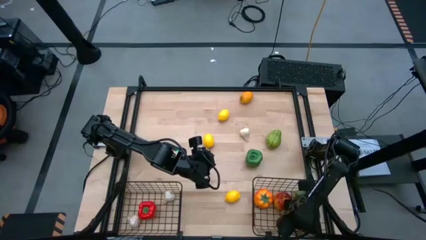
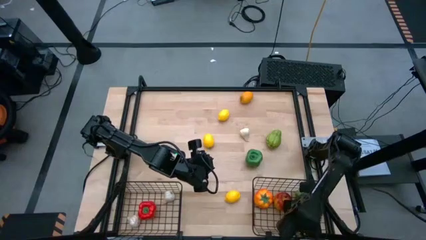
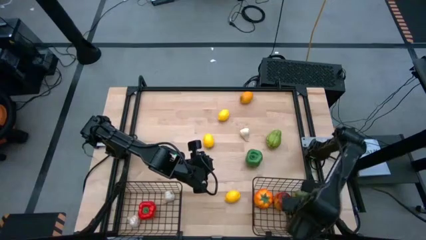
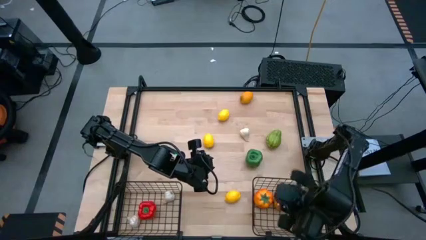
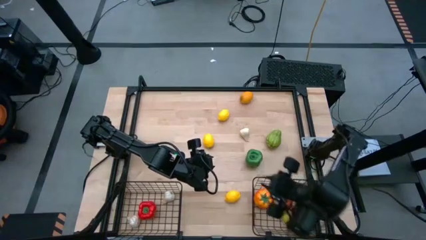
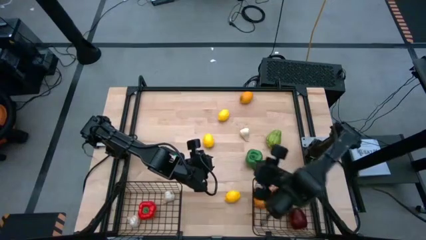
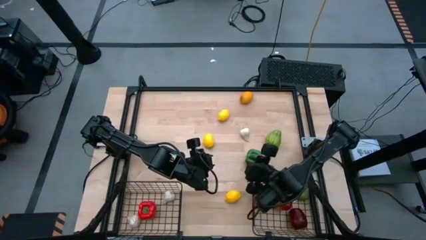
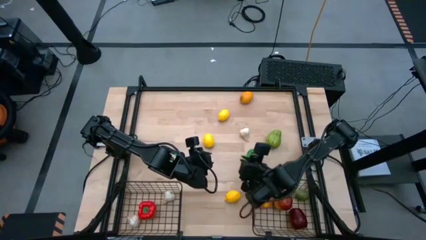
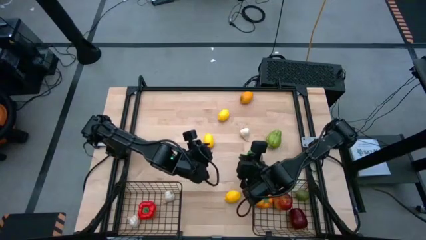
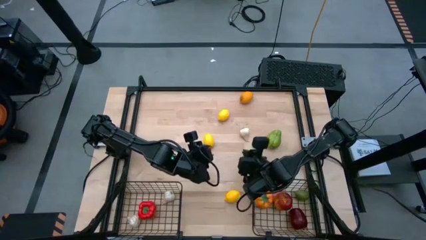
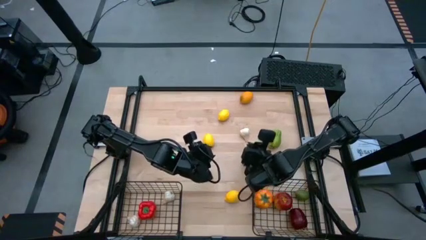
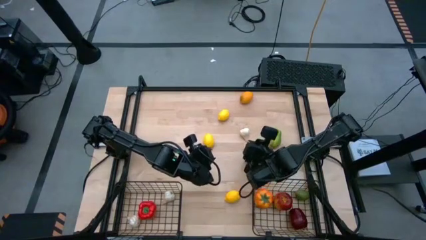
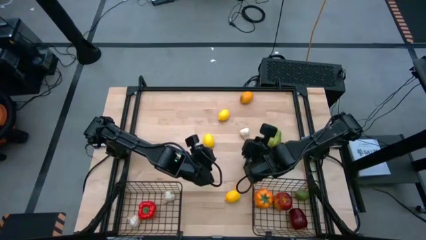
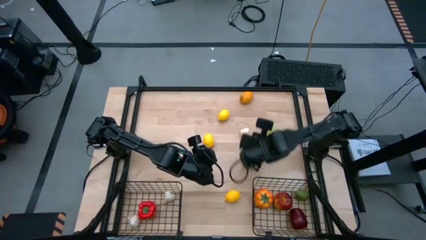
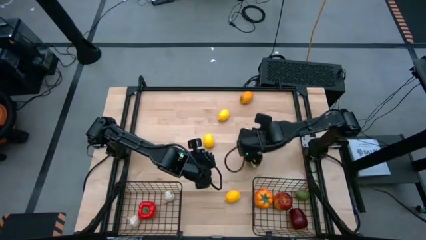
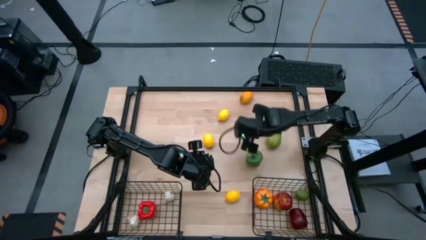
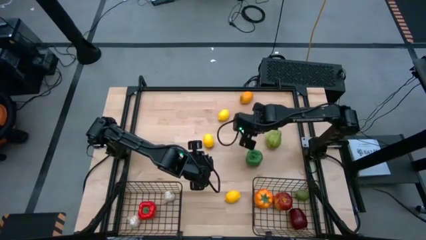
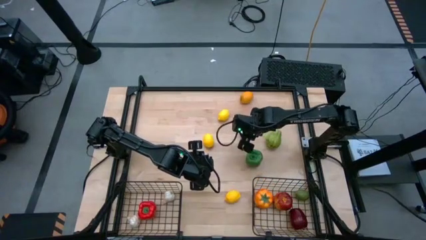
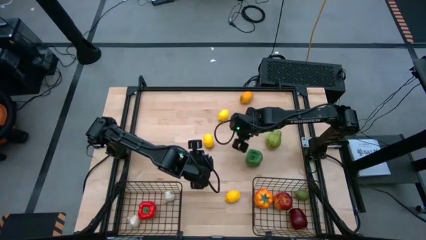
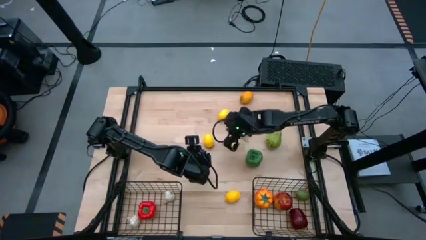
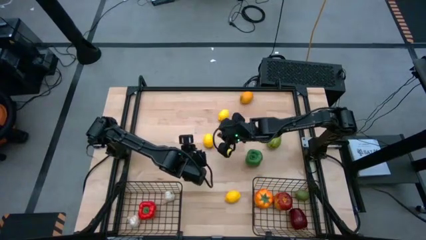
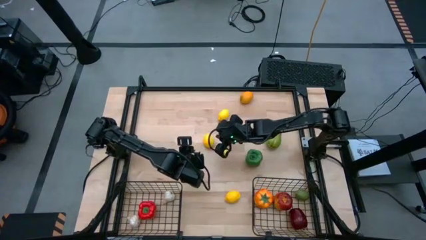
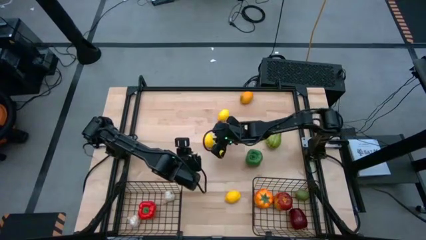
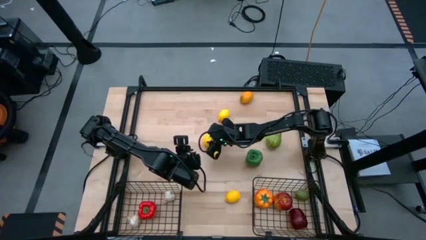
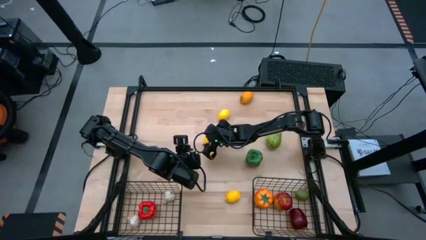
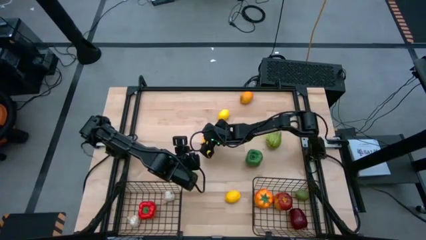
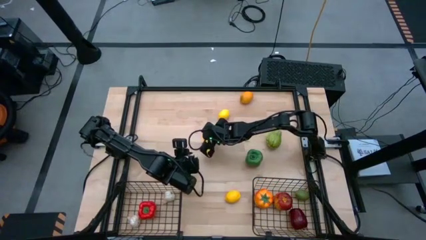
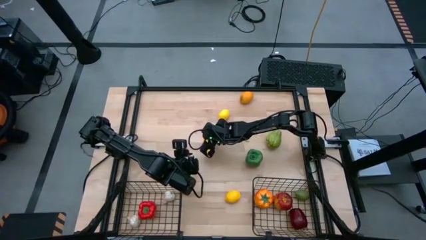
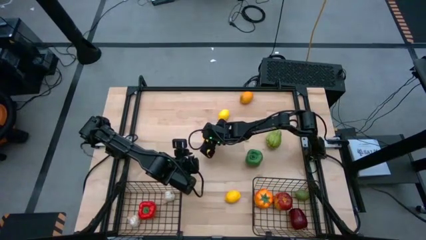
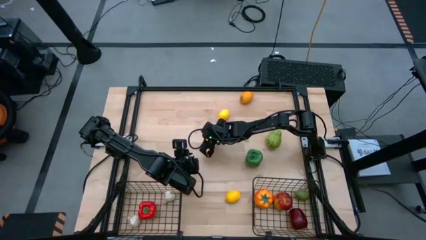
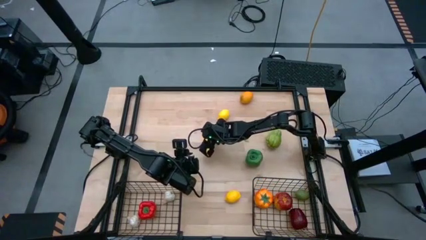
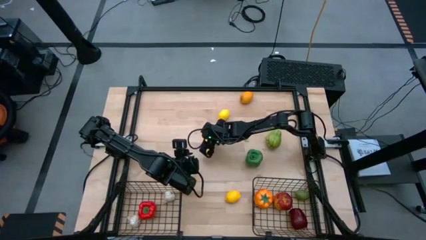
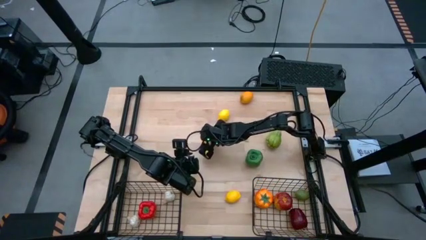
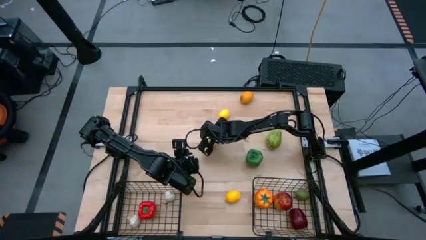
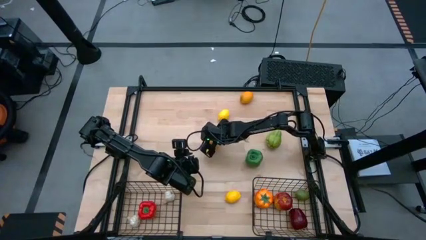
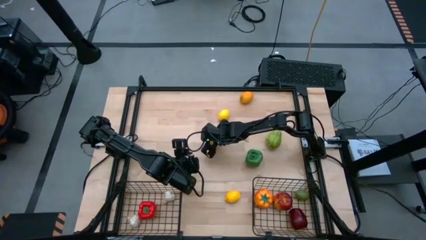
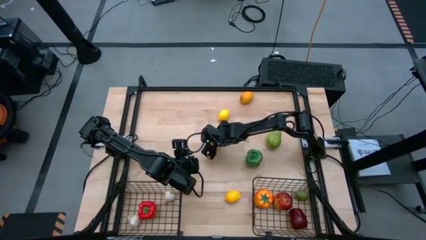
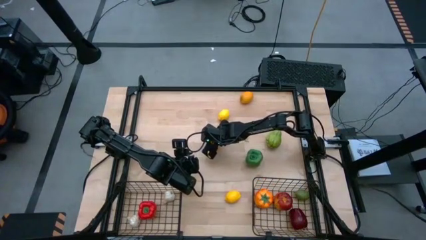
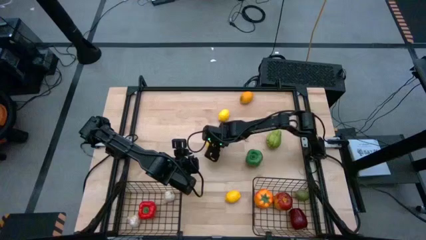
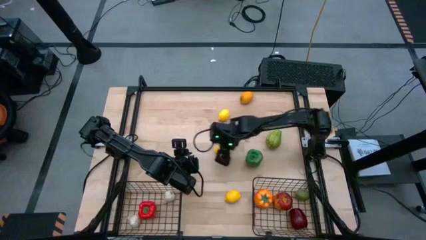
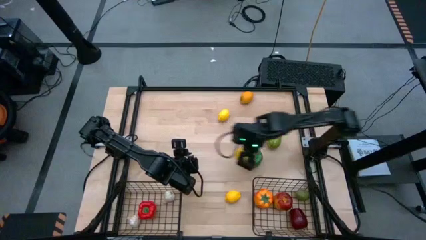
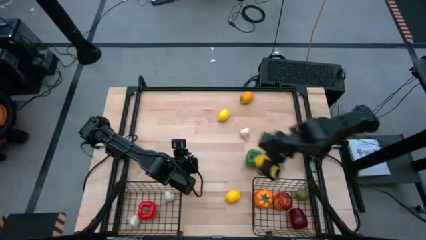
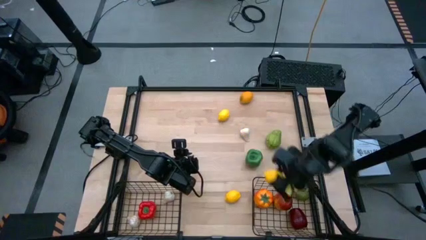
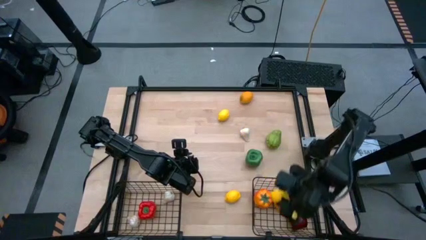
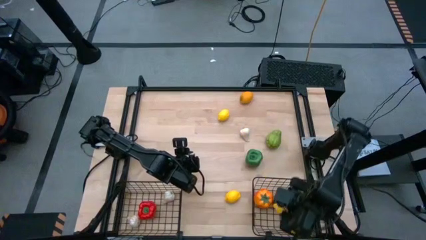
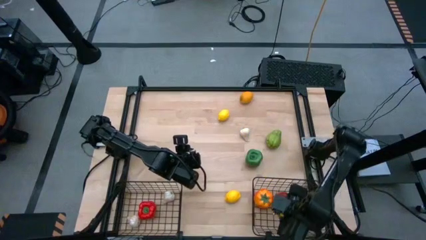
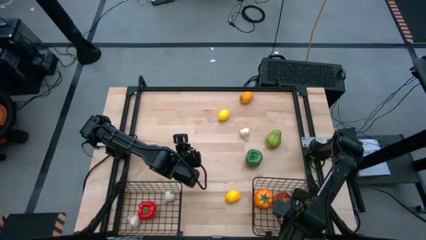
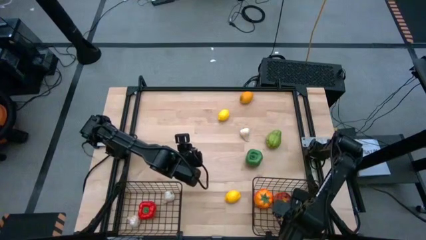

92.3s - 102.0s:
Task: Sort produce into baskets
Put the middle bottom yellow lemon into the right black wire basket

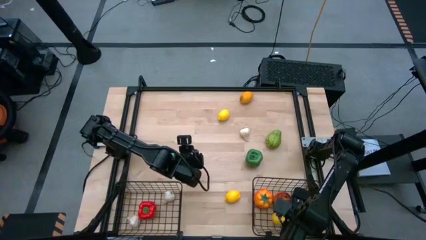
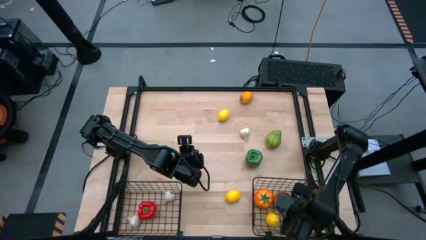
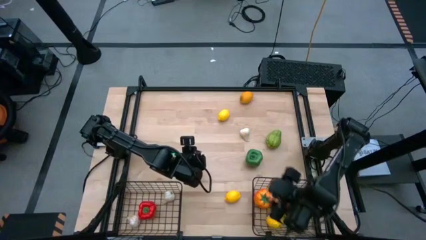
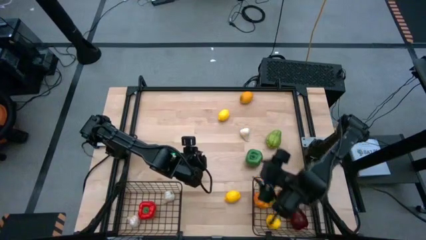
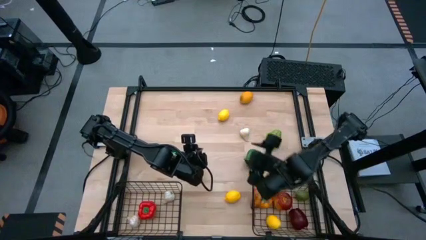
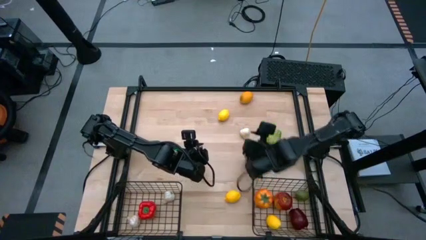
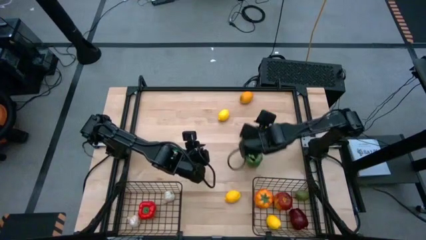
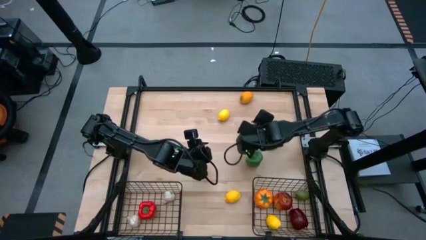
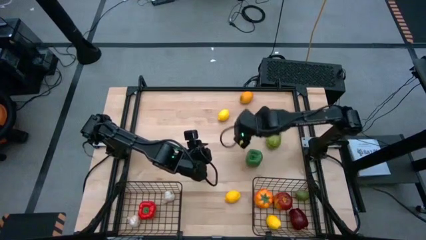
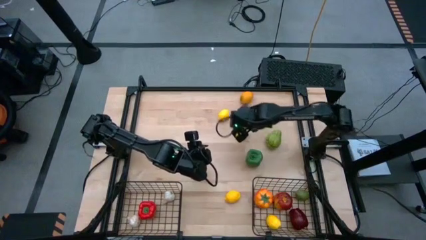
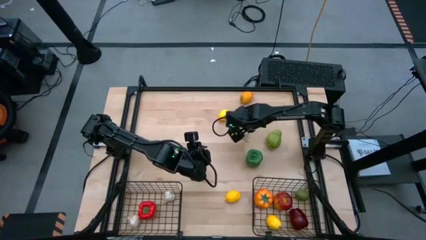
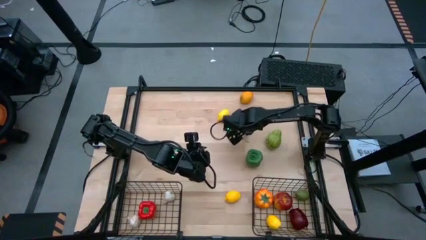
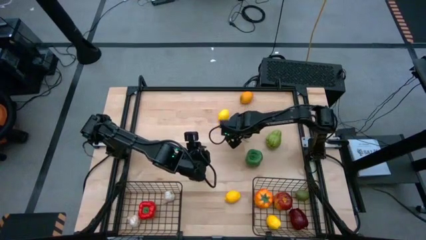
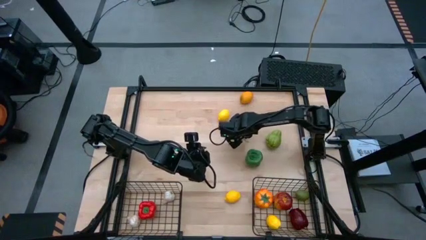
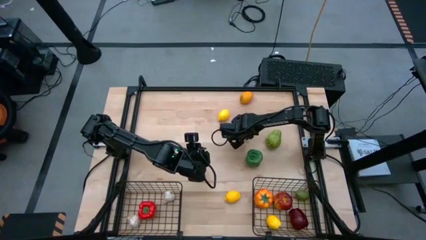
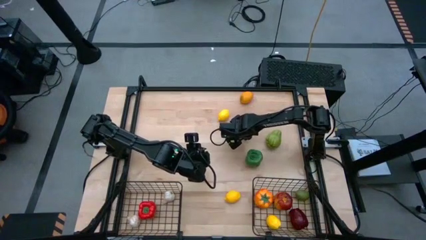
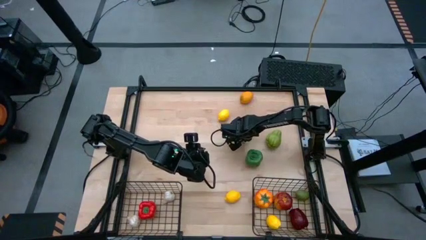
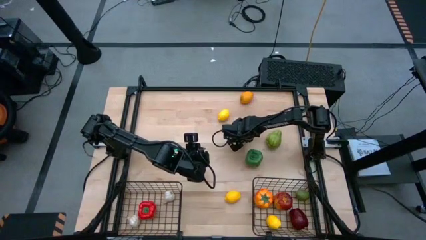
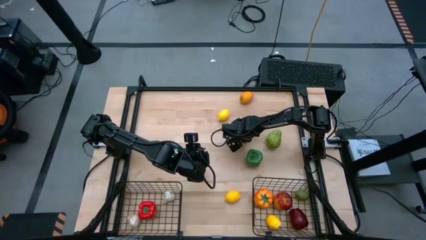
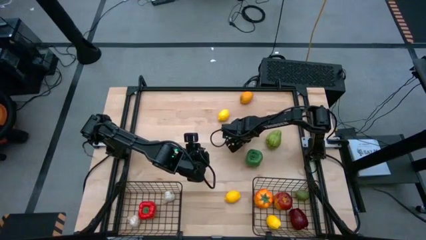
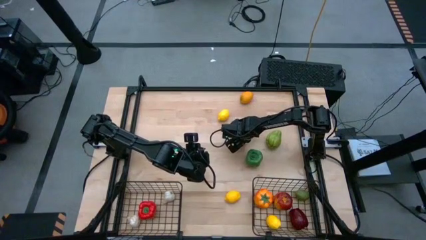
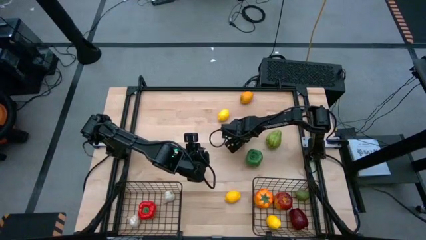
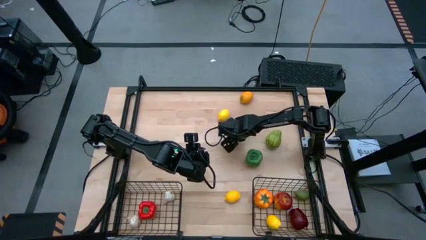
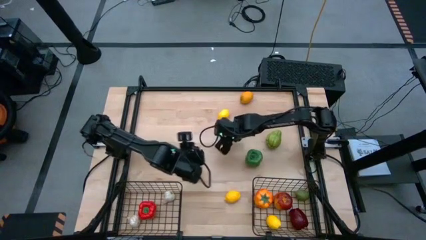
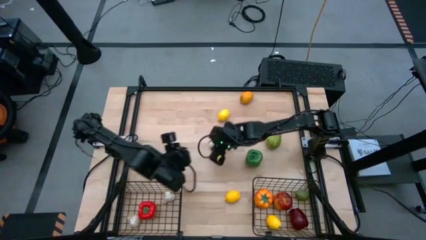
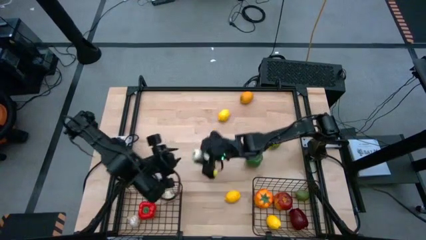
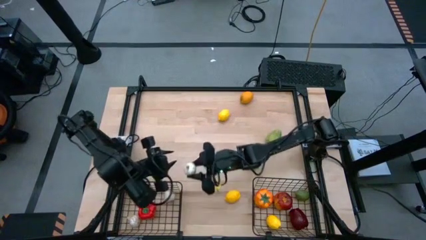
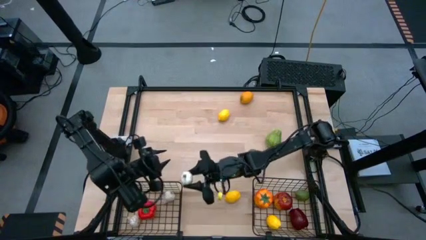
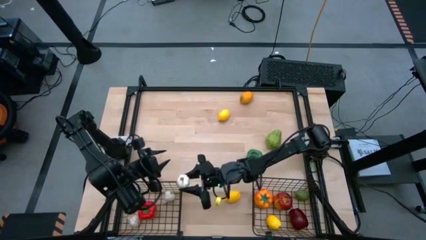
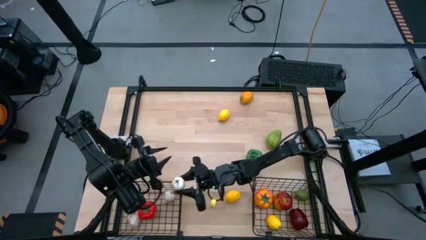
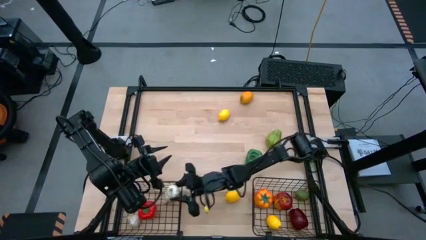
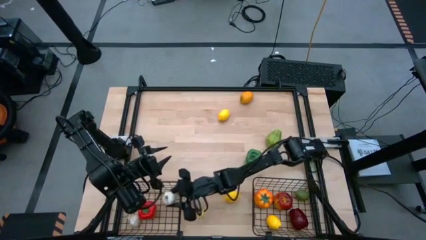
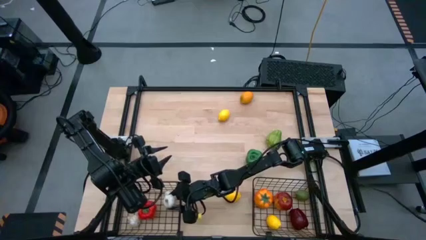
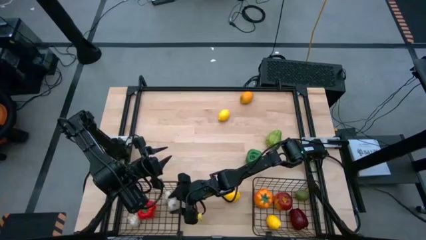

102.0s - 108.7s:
Put the white garlic into the left black wire basket
